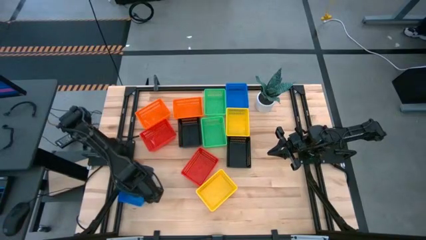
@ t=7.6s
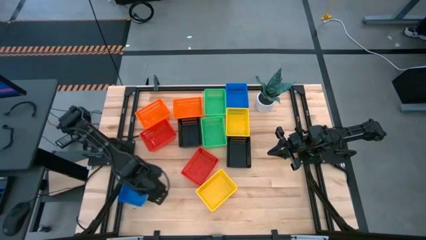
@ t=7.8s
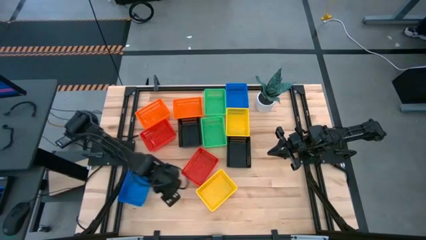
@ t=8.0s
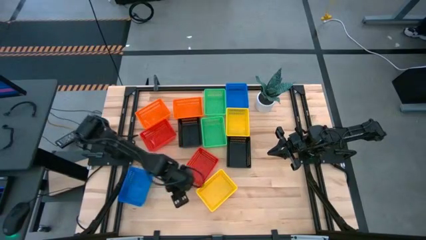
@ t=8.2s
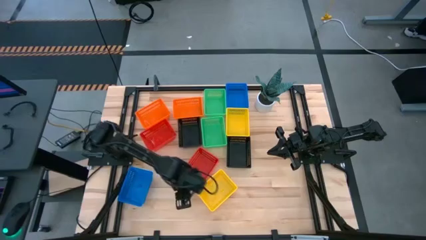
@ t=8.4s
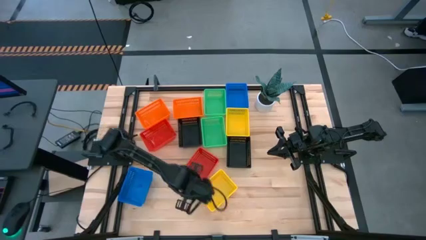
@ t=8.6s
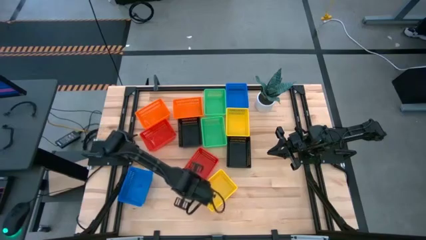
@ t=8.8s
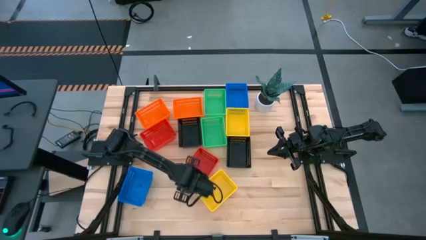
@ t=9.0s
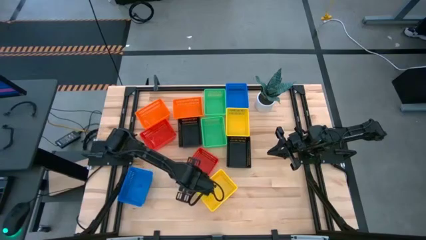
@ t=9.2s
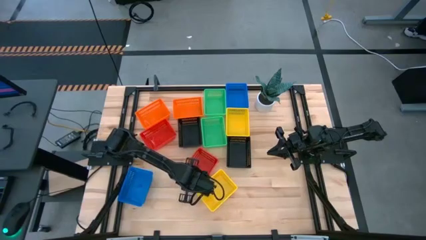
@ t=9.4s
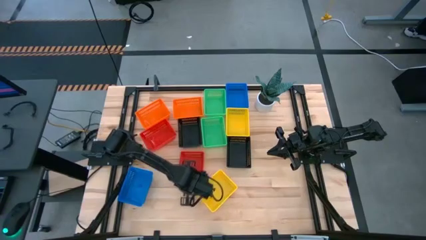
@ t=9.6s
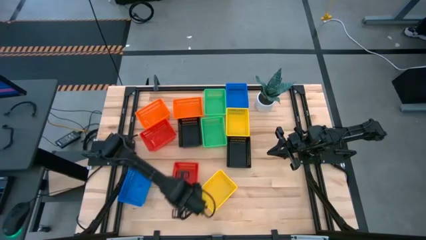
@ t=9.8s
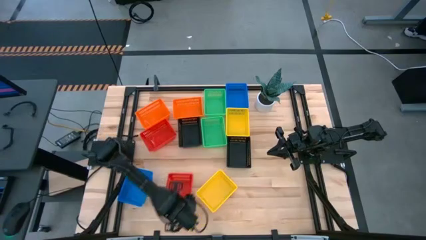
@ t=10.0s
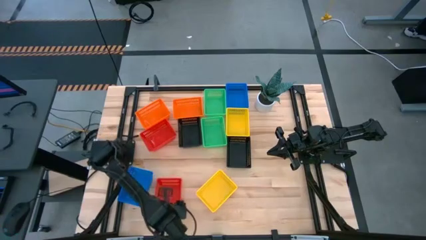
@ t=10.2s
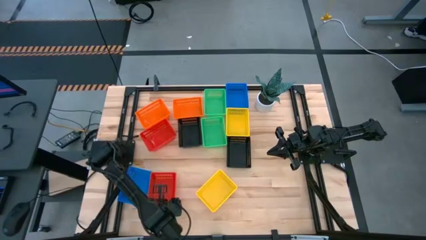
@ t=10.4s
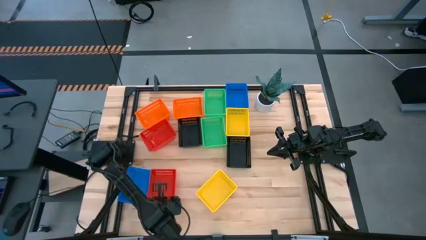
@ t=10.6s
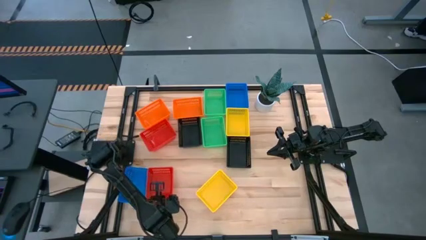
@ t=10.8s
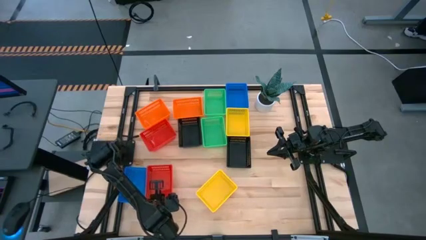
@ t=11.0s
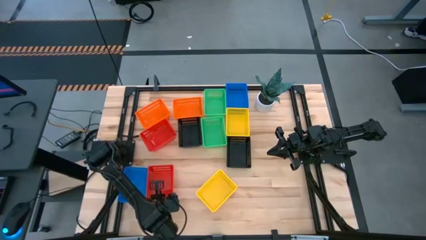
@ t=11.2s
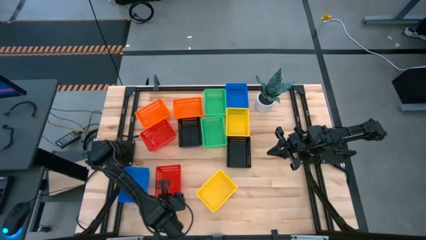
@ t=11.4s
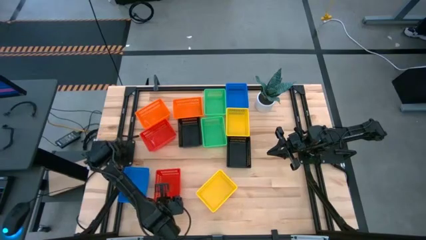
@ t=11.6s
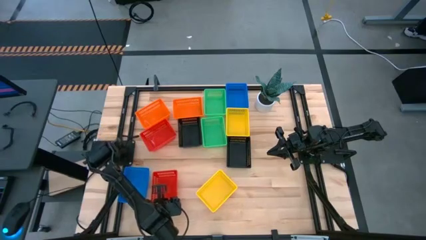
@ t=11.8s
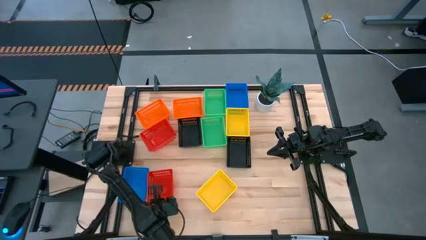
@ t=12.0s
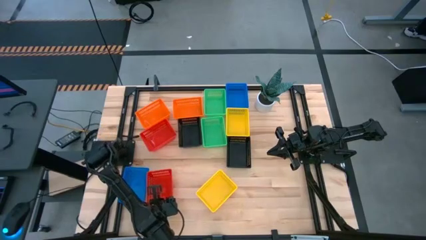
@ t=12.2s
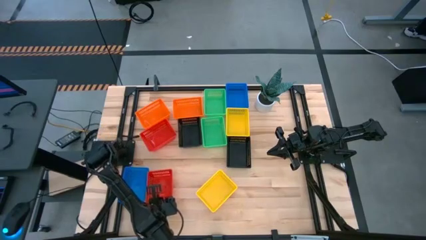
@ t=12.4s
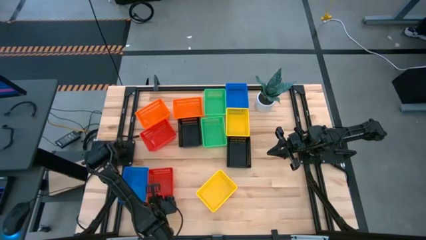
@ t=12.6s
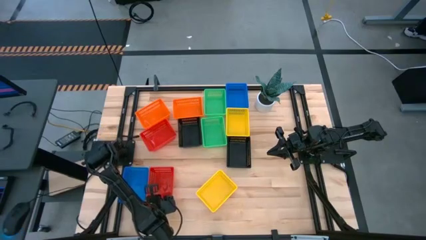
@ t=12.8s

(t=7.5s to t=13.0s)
Move the bottom red bin to the bottom left of the table

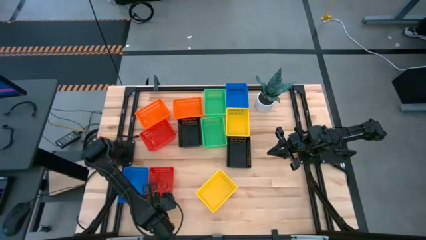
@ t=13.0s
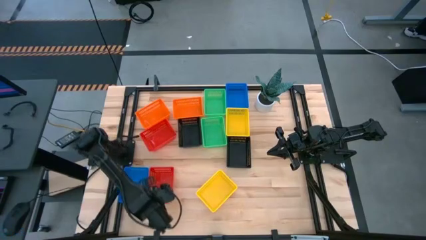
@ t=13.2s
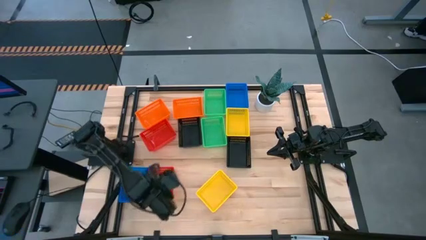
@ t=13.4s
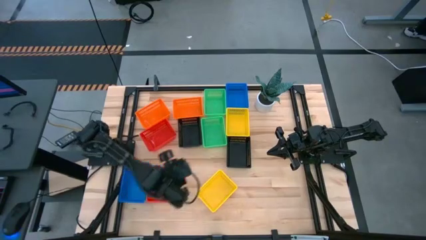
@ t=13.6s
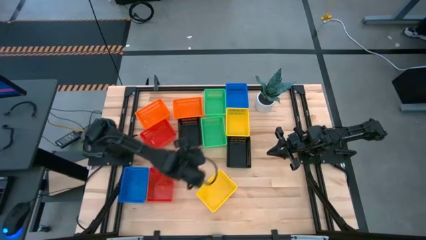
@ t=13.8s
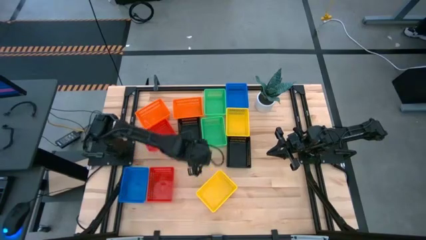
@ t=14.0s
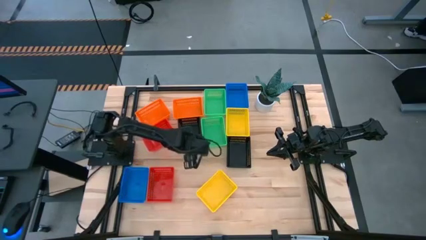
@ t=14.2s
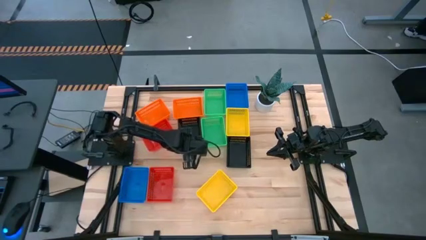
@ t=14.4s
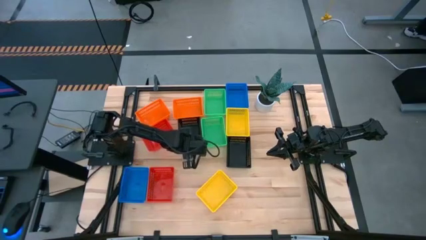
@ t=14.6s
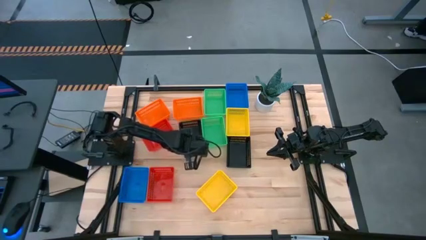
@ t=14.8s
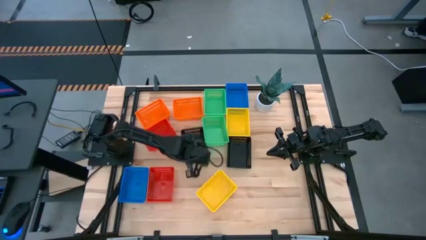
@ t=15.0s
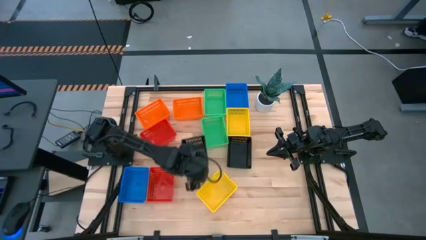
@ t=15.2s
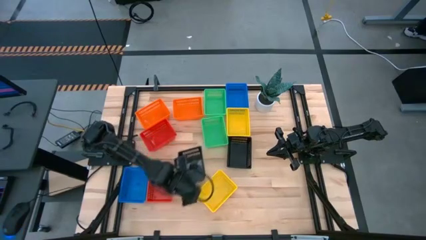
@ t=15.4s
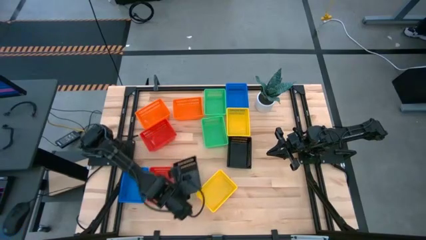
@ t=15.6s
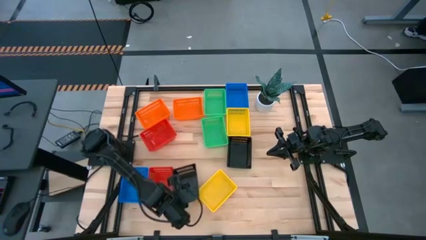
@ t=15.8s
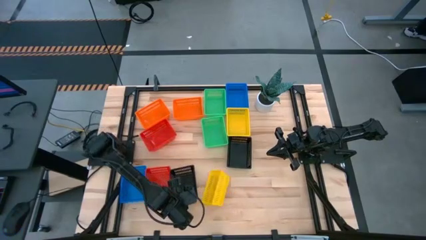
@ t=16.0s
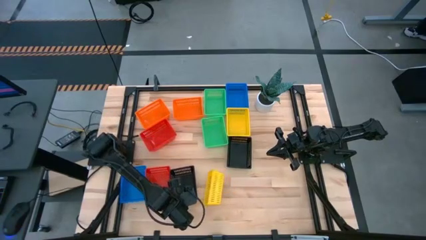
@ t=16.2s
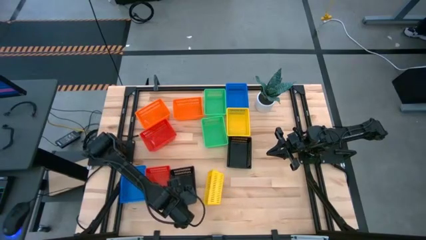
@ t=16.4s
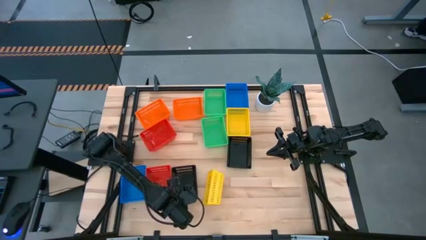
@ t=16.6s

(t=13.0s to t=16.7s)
Move the left black bin to the bottom left of the table

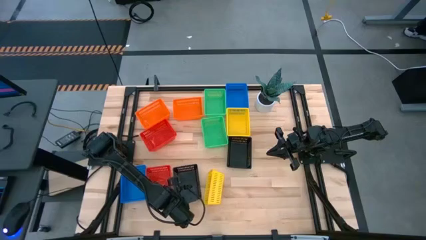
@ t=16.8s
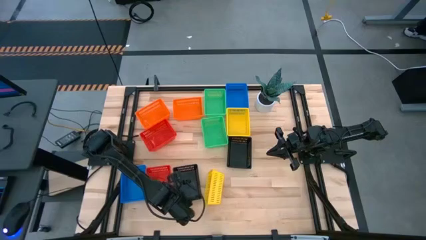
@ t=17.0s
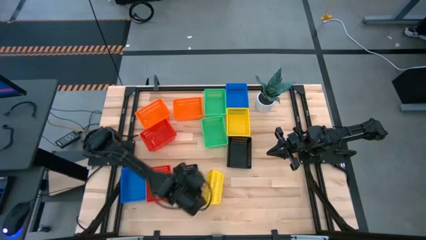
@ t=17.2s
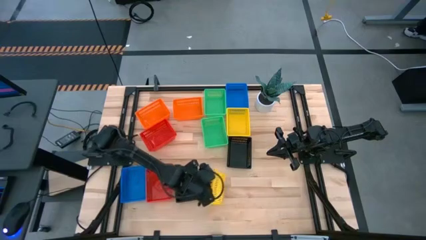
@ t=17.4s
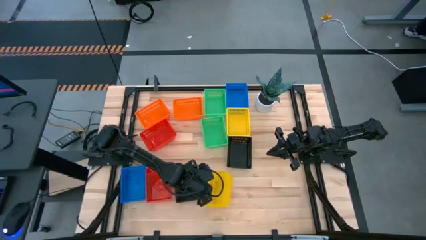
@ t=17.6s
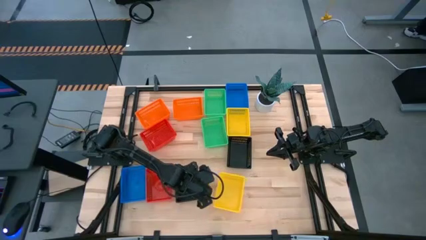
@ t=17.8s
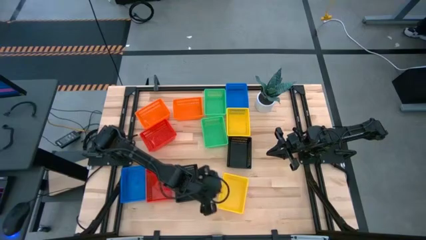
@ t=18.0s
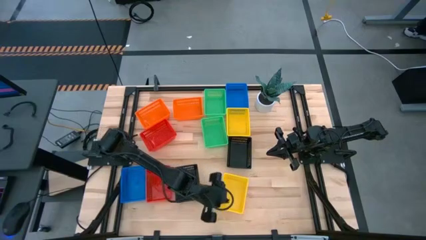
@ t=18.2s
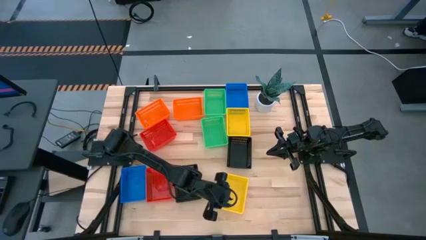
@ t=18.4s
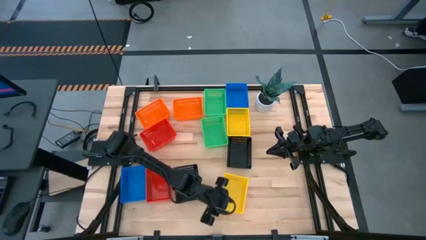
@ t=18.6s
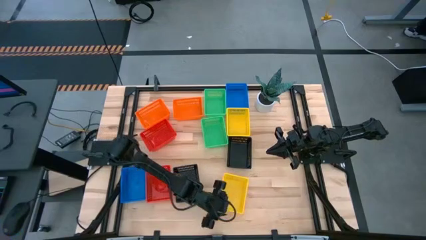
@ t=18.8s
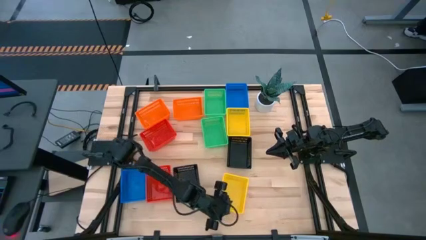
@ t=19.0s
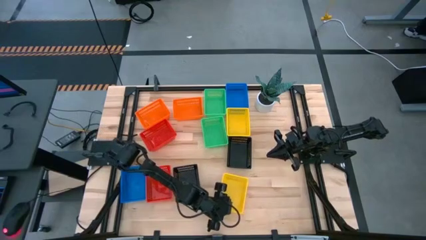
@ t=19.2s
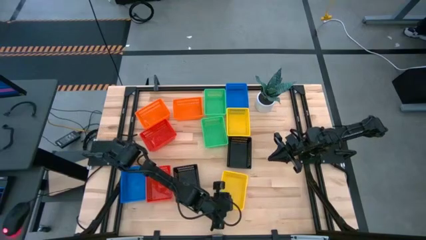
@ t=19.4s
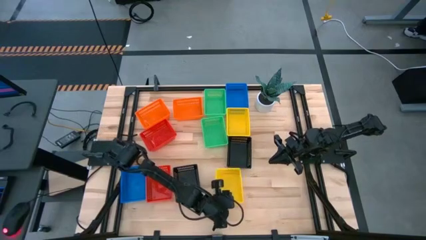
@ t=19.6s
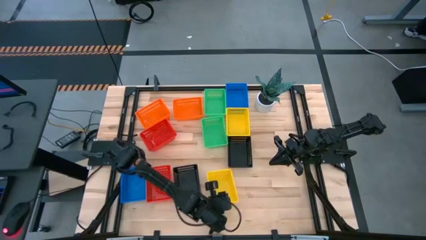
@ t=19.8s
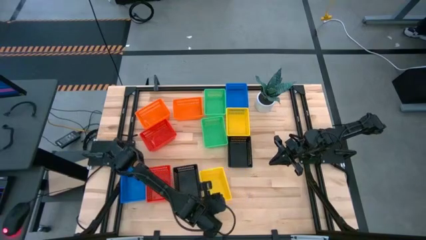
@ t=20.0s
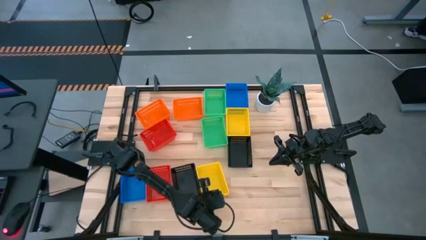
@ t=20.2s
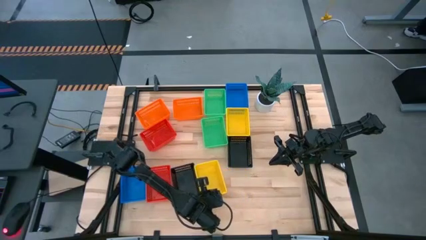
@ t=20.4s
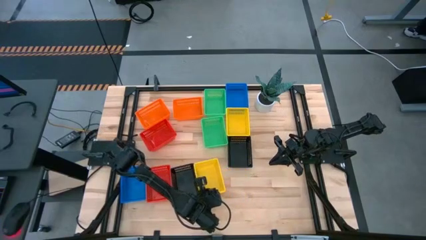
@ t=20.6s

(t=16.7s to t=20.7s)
Adjust the bottom yellow bin
